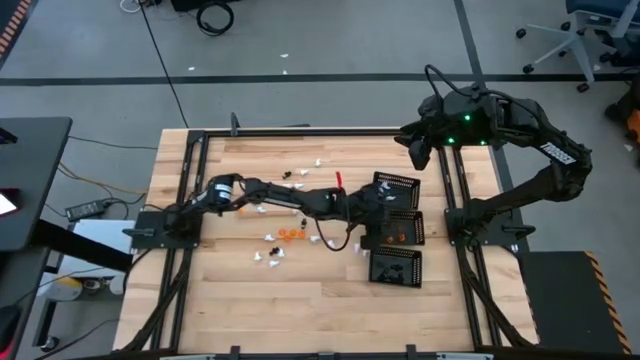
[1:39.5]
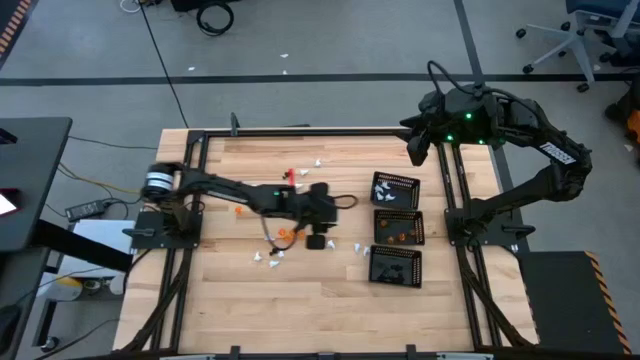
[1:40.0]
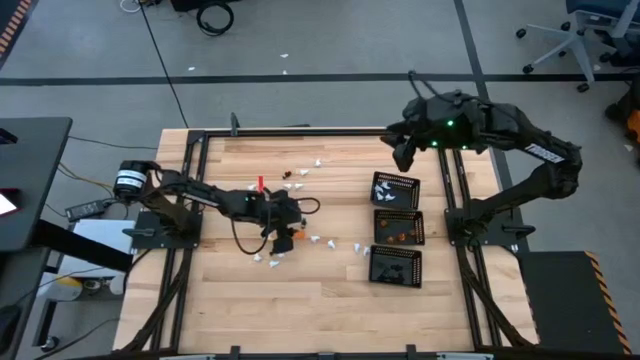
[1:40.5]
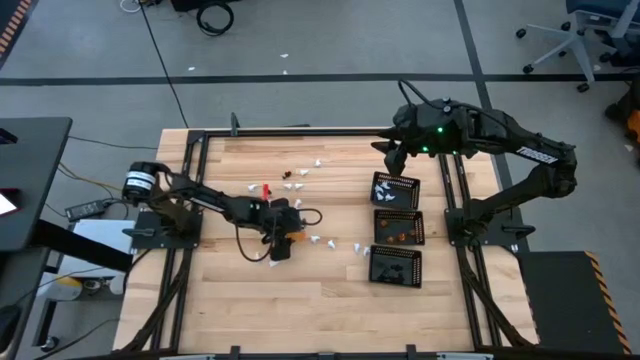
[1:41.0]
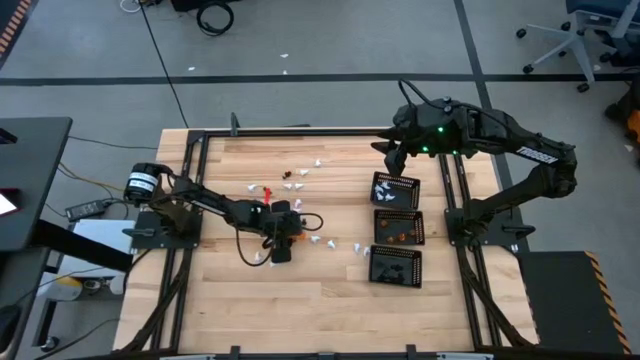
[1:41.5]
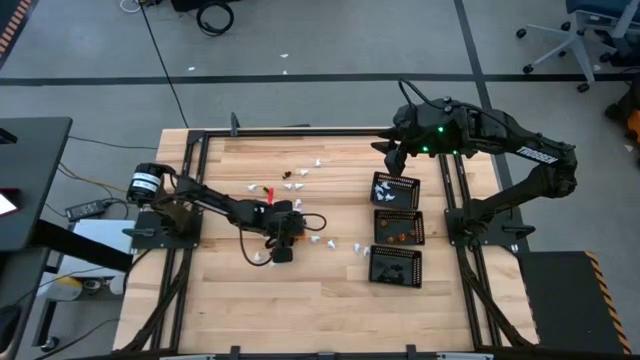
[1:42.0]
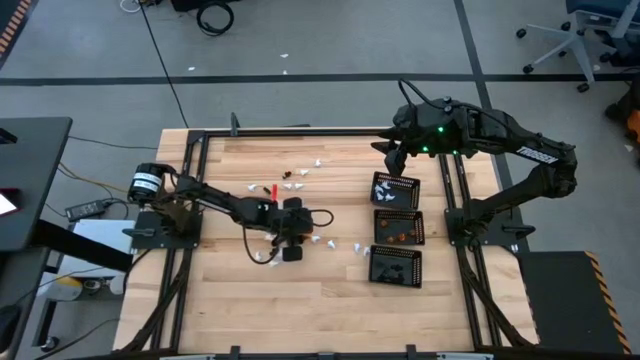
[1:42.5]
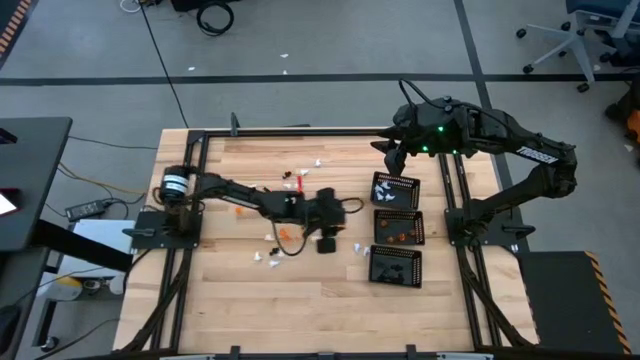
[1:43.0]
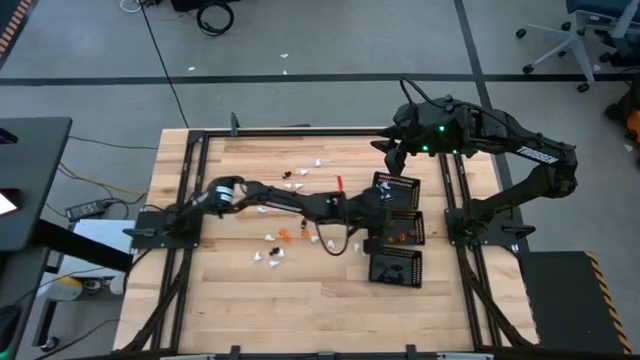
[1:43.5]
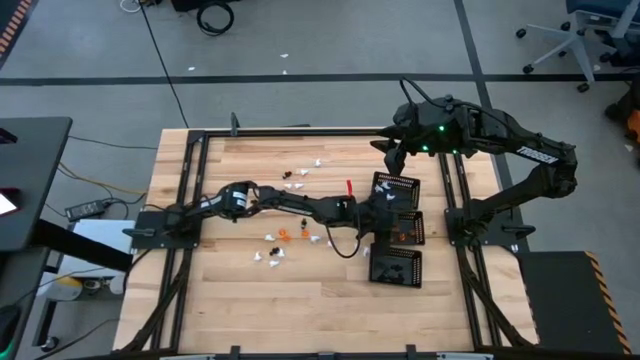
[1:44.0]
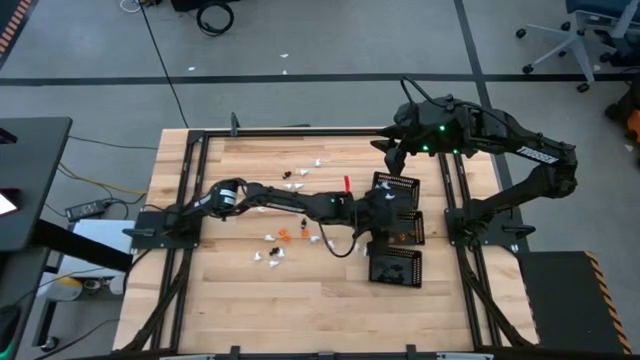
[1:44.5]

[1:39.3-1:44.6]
Task: Sort Halloween decoration
Put the orange pumpkin toy into the center black bin

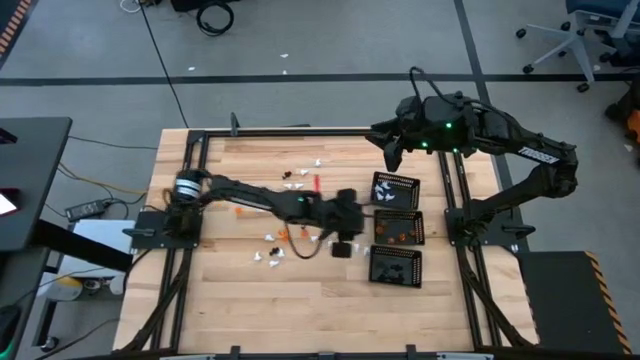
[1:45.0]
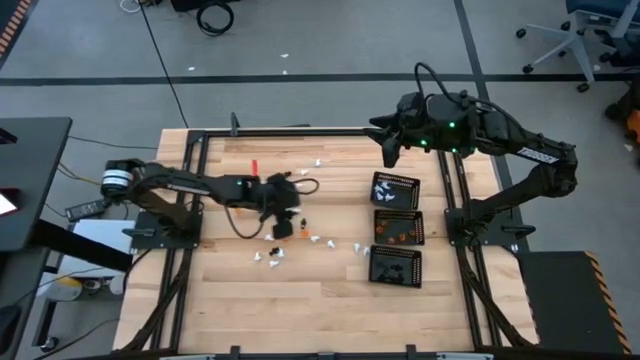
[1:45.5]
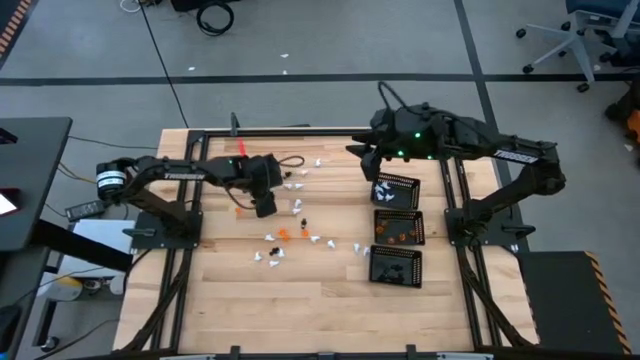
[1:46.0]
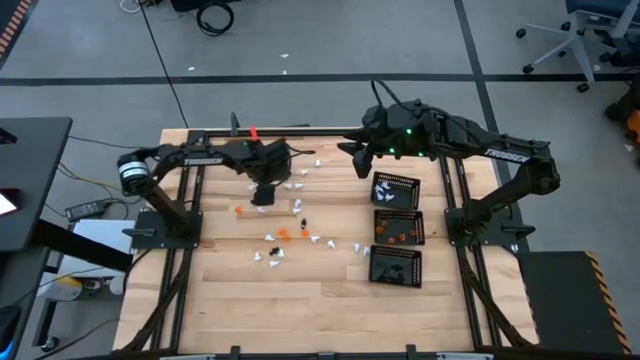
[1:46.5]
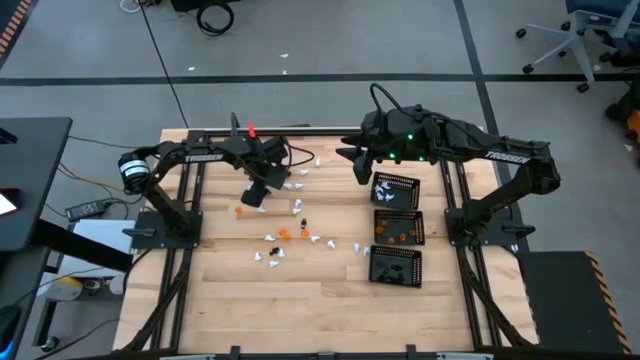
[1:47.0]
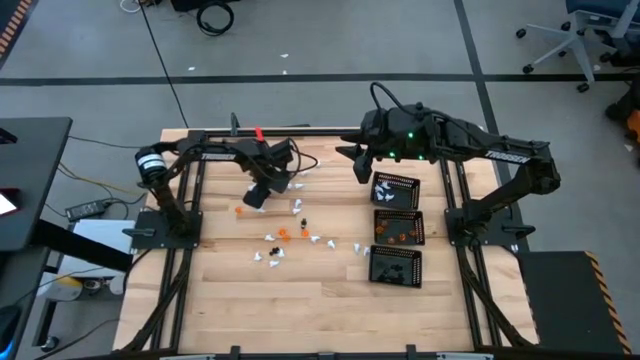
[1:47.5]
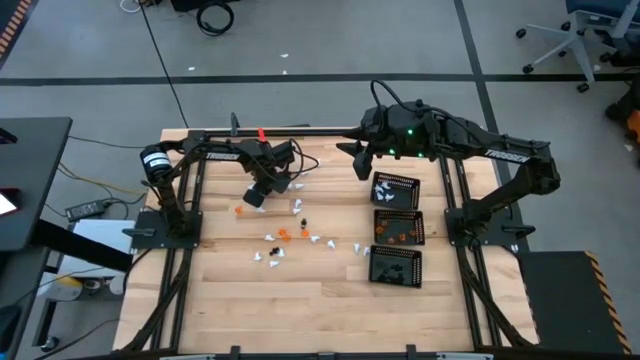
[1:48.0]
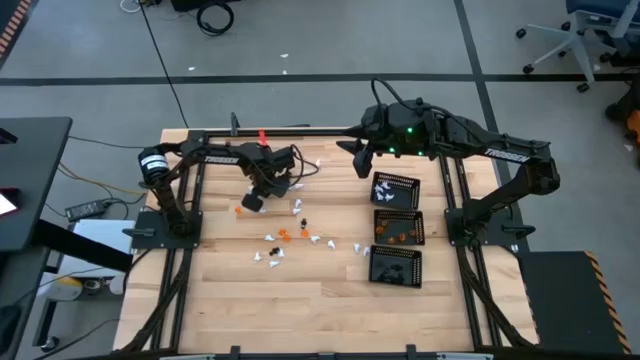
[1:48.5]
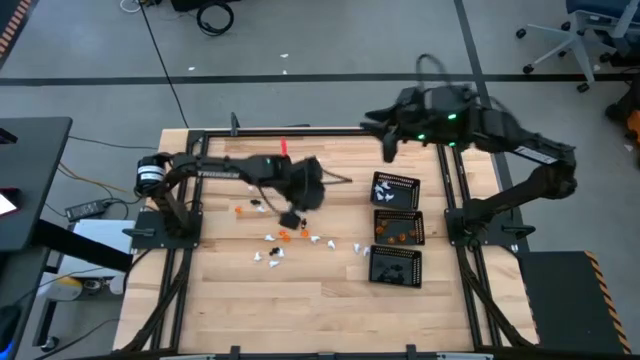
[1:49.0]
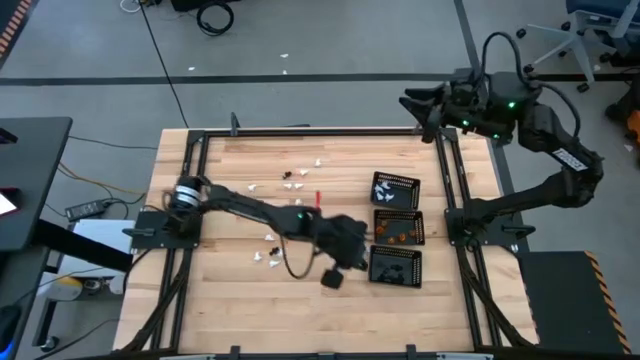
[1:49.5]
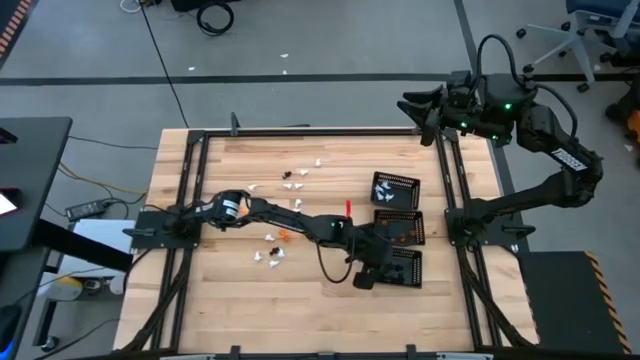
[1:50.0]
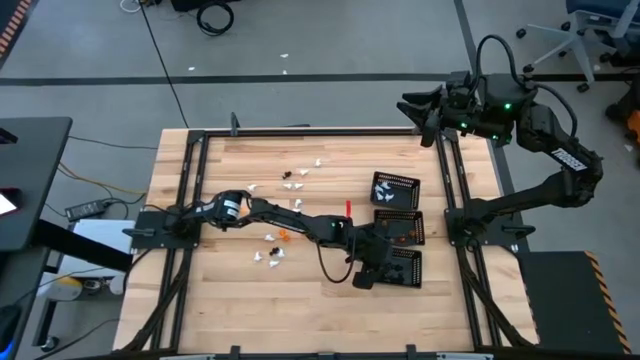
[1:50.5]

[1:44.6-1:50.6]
Put the black ghost toy into the bottom black bin

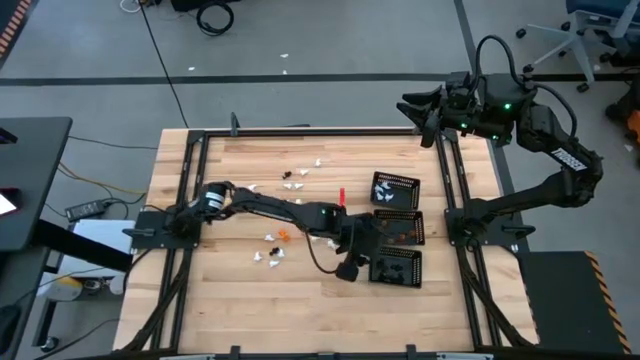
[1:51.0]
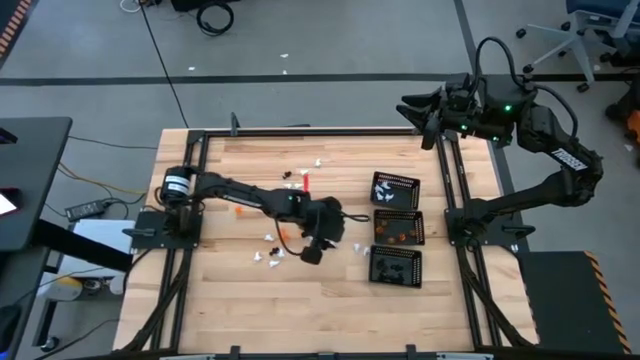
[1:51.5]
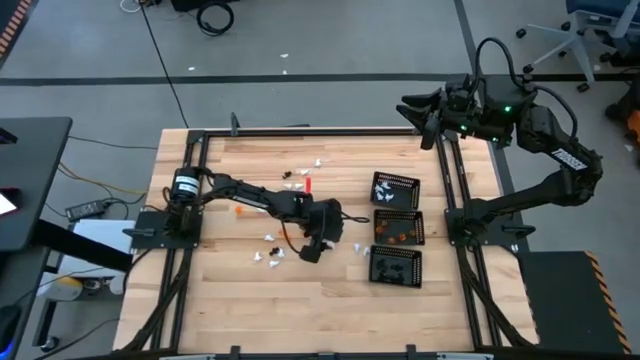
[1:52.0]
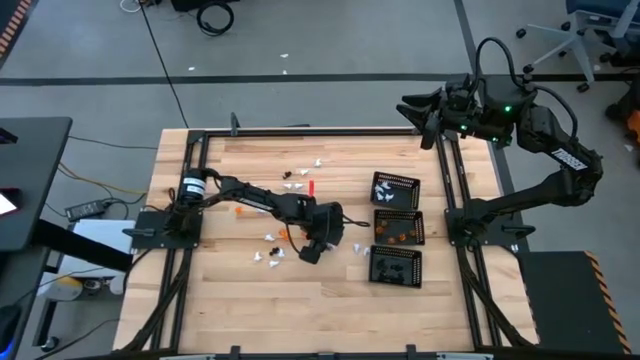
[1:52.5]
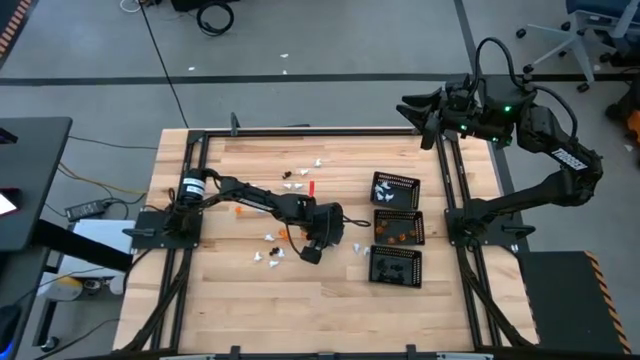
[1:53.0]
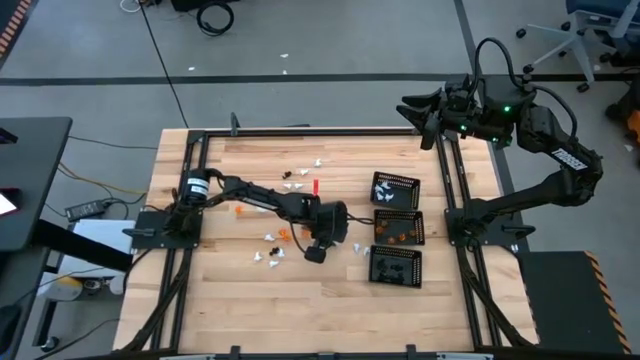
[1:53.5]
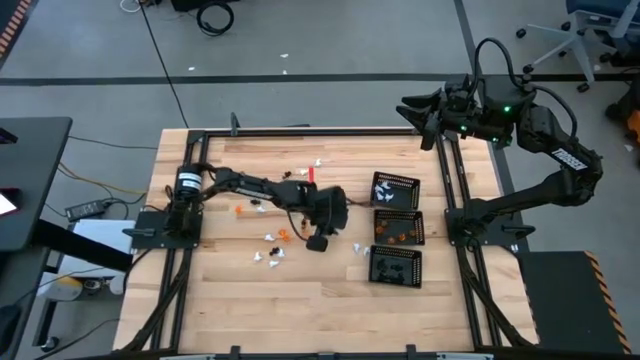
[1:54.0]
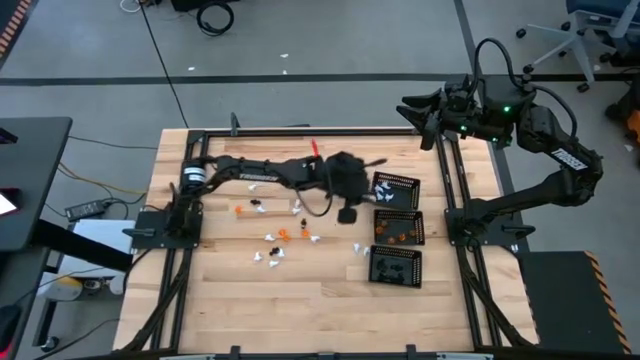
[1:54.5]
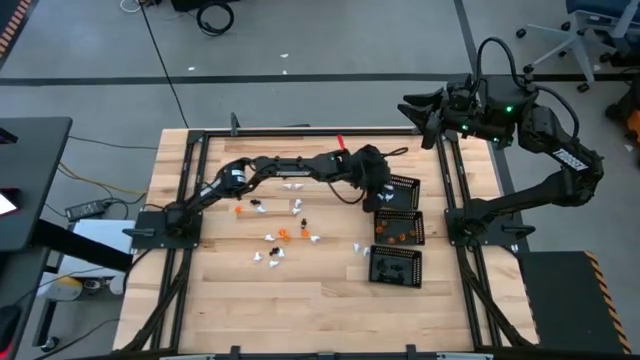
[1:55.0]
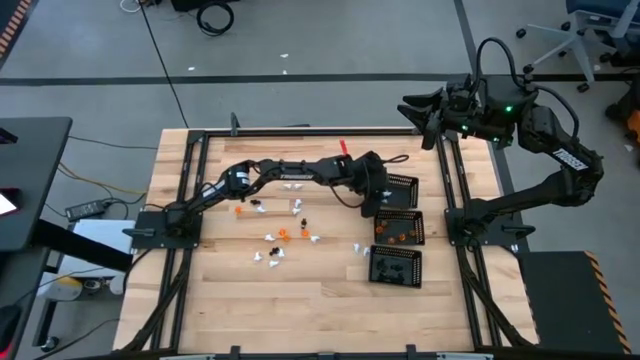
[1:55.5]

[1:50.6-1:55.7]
Put the white ghost toy into the top black bin

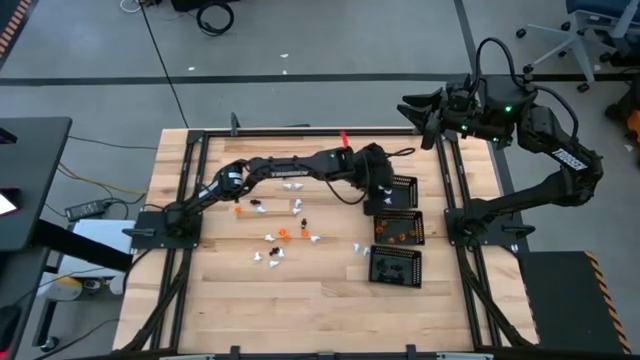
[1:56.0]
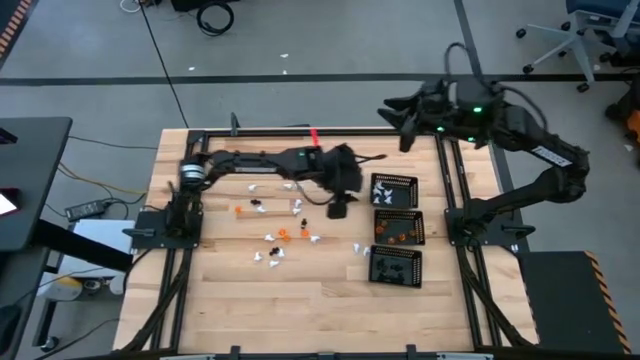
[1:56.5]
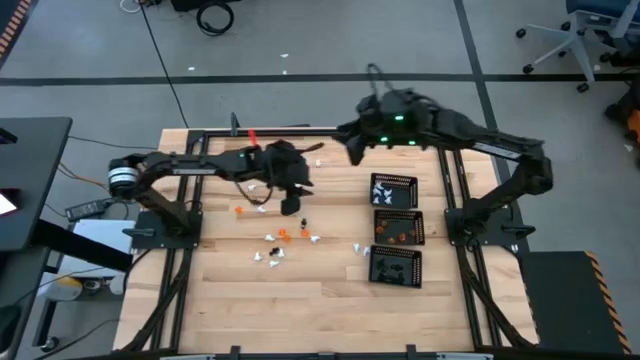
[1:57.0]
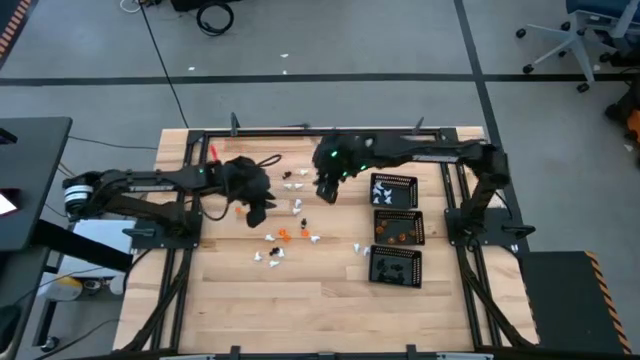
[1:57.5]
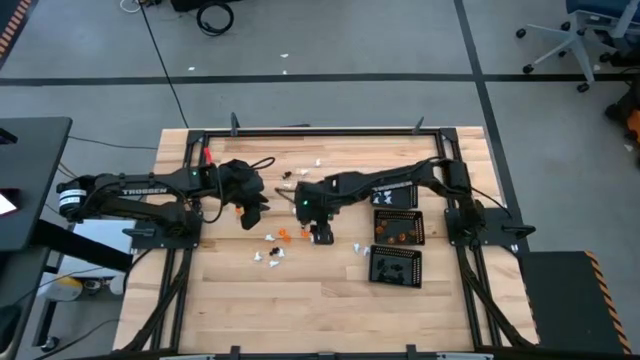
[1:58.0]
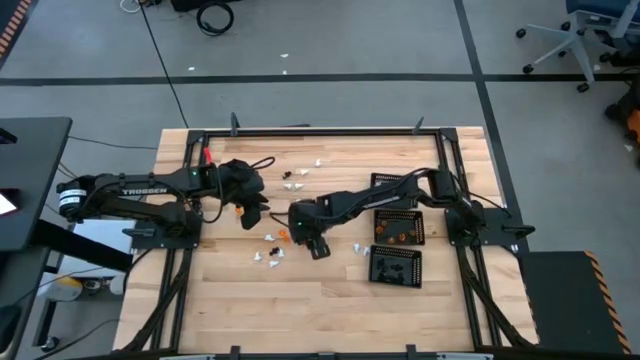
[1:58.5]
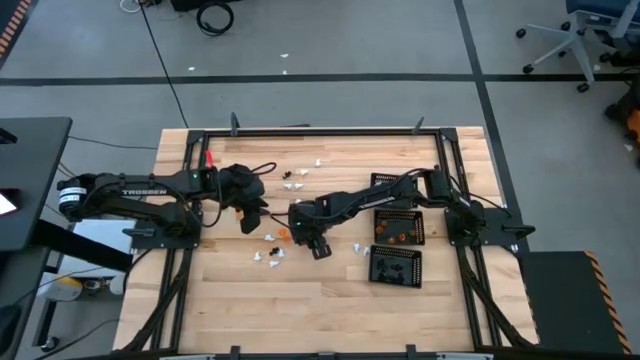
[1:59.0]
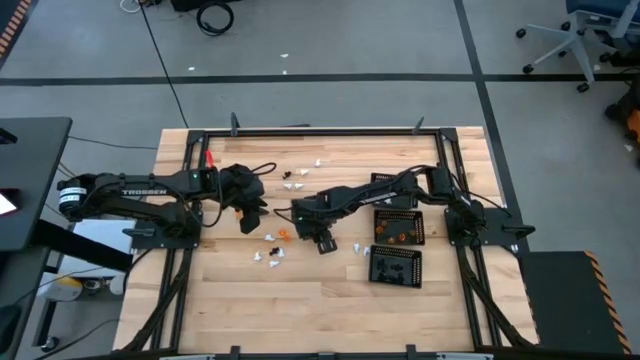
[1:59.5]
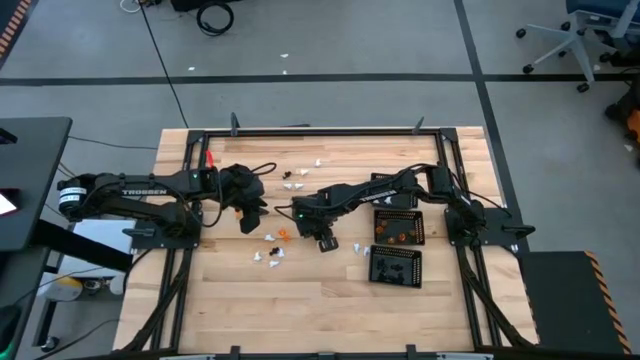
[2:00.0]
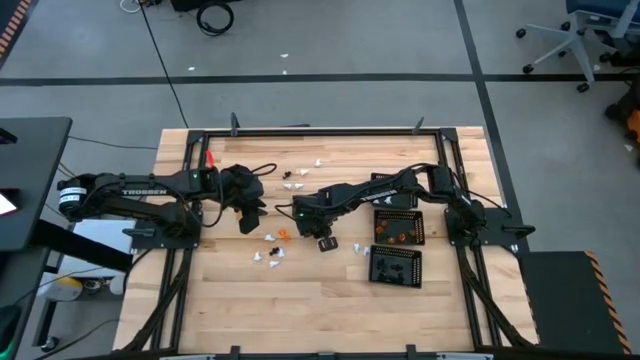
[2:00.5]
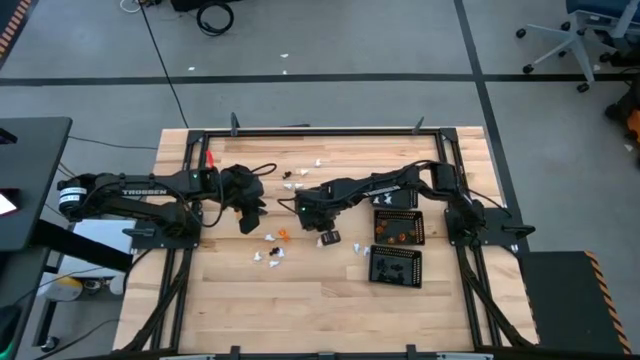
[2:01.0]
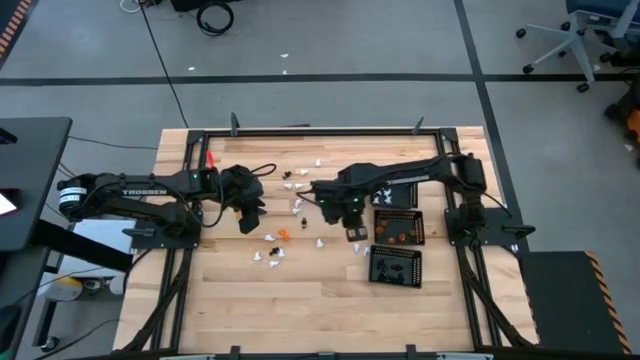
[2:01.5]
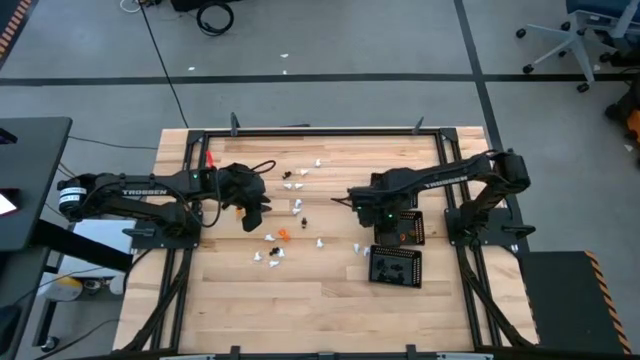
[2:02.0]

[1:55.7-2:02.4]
Put the orange pumpkin toy into the center black bin
